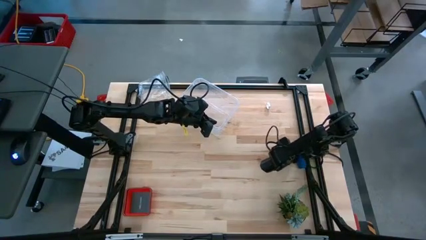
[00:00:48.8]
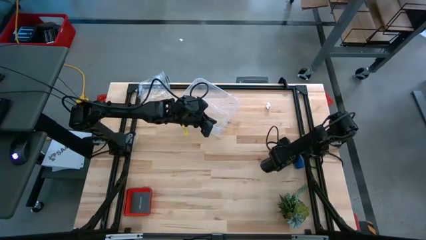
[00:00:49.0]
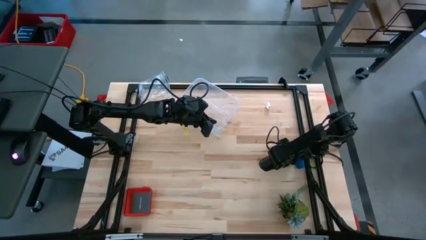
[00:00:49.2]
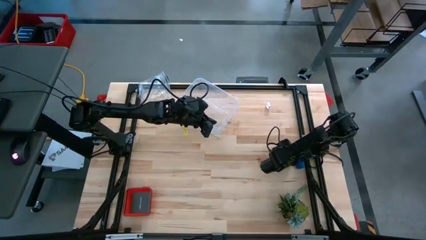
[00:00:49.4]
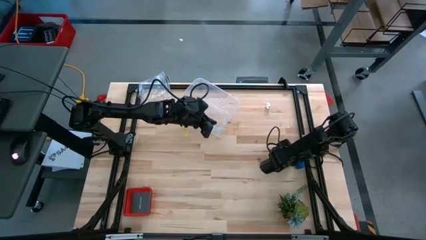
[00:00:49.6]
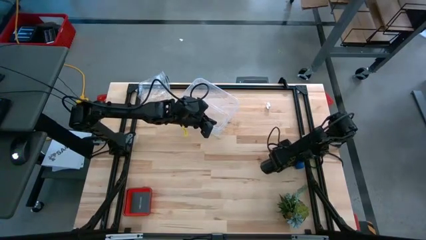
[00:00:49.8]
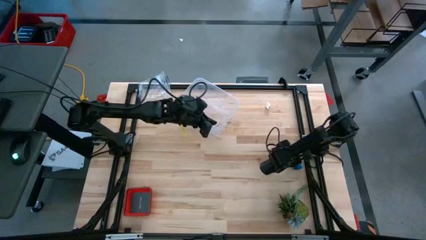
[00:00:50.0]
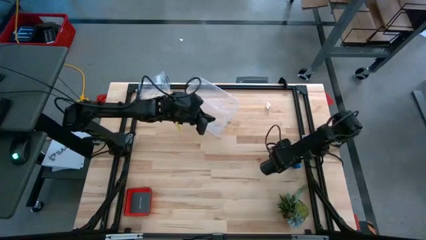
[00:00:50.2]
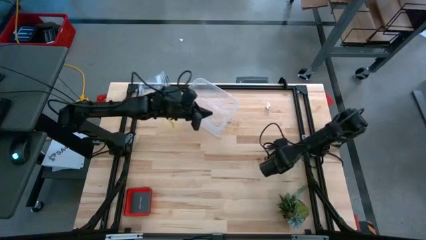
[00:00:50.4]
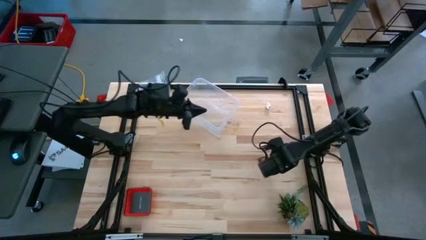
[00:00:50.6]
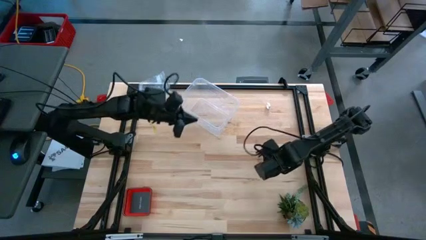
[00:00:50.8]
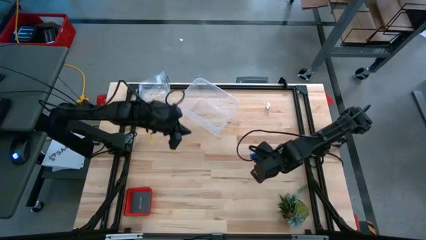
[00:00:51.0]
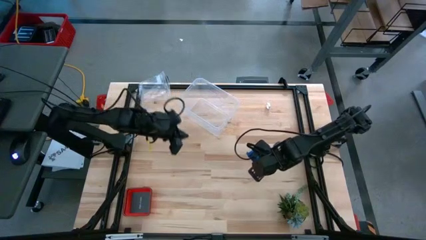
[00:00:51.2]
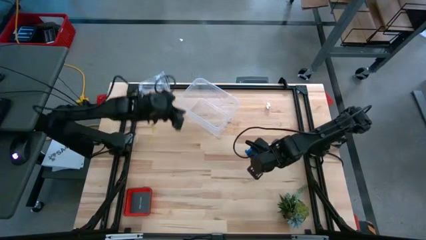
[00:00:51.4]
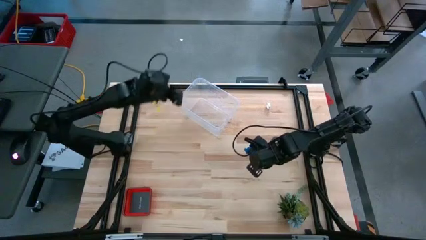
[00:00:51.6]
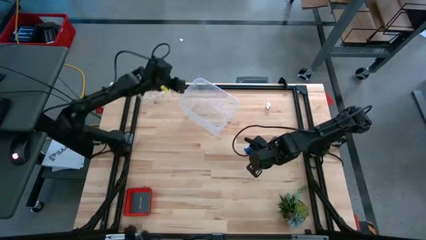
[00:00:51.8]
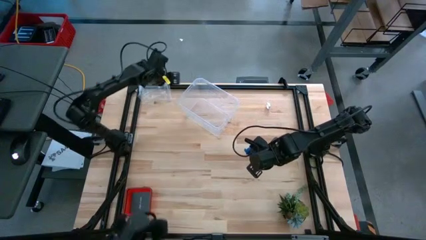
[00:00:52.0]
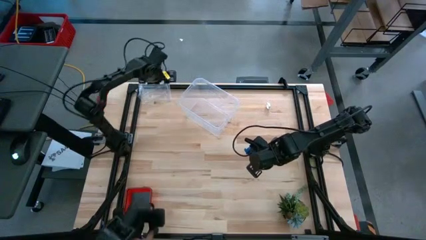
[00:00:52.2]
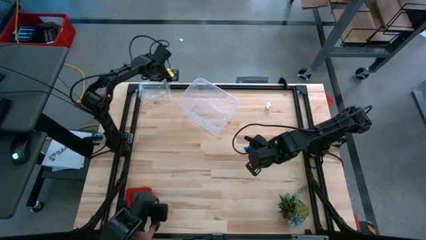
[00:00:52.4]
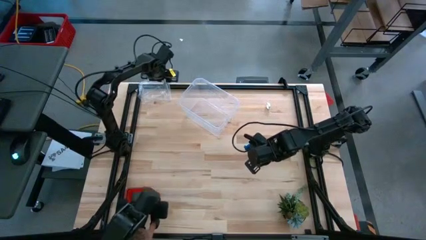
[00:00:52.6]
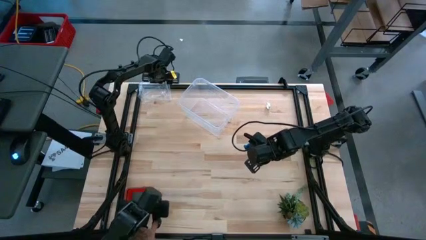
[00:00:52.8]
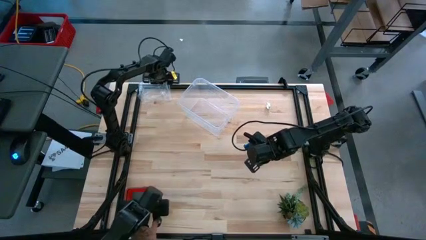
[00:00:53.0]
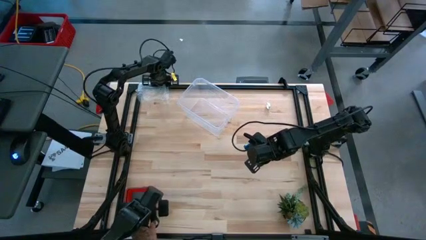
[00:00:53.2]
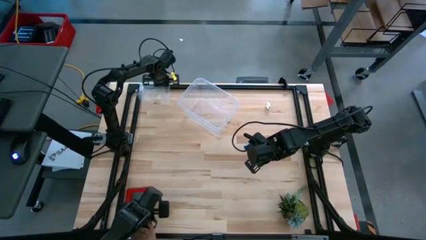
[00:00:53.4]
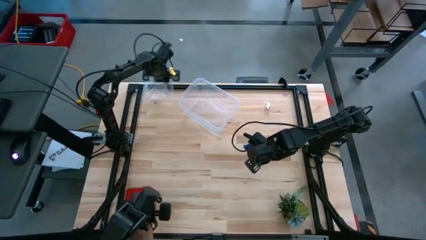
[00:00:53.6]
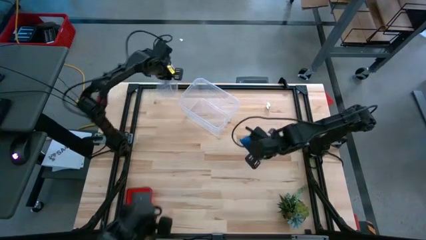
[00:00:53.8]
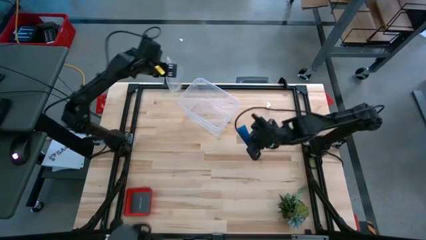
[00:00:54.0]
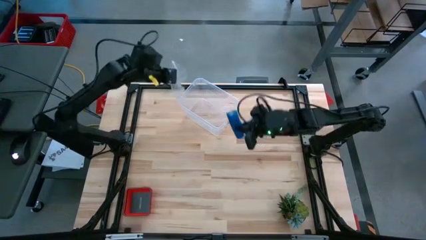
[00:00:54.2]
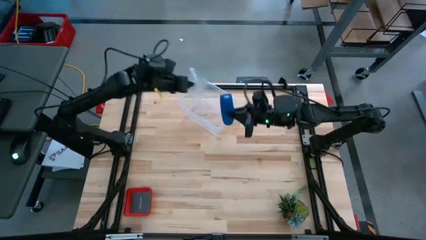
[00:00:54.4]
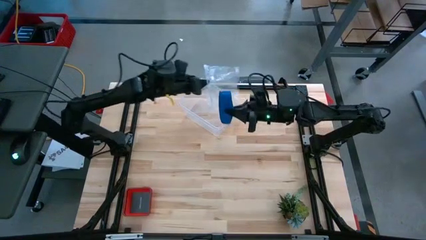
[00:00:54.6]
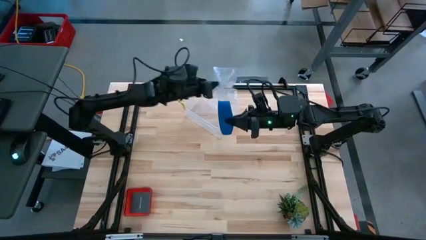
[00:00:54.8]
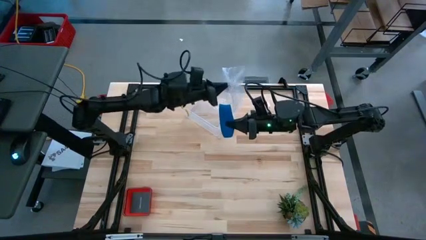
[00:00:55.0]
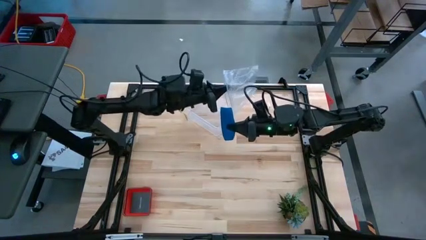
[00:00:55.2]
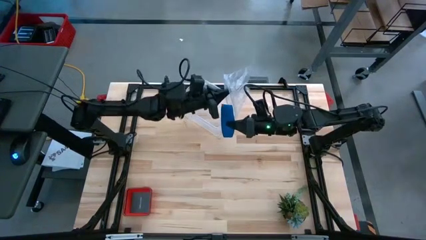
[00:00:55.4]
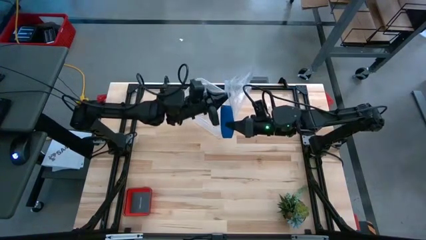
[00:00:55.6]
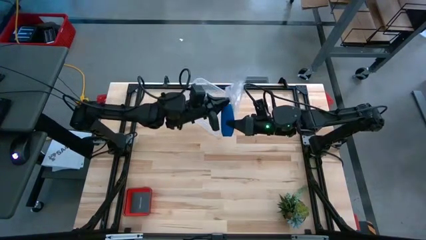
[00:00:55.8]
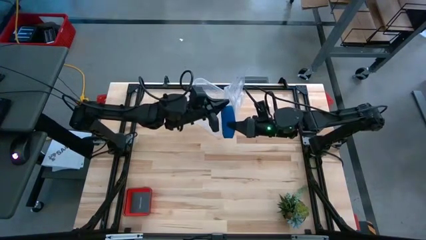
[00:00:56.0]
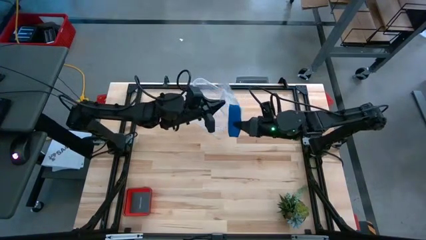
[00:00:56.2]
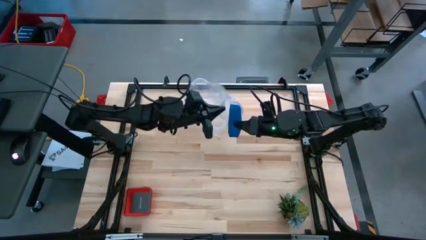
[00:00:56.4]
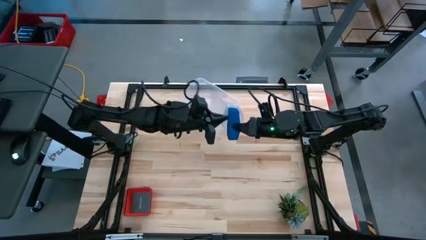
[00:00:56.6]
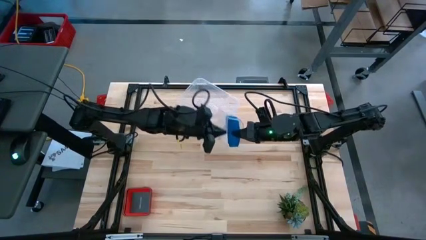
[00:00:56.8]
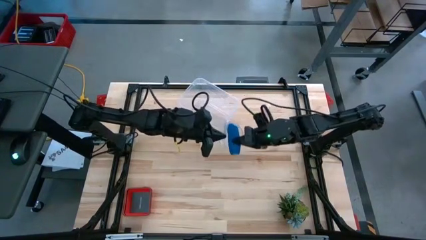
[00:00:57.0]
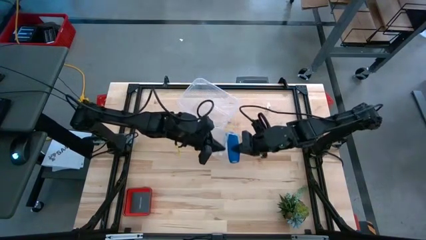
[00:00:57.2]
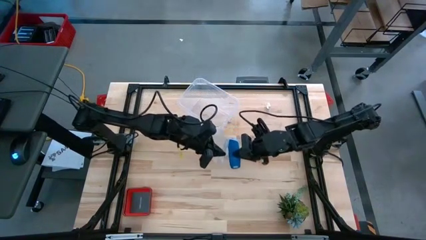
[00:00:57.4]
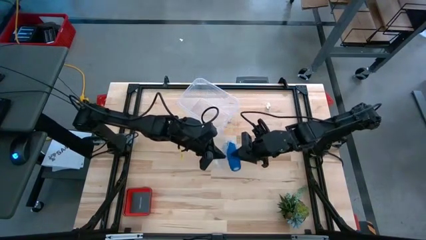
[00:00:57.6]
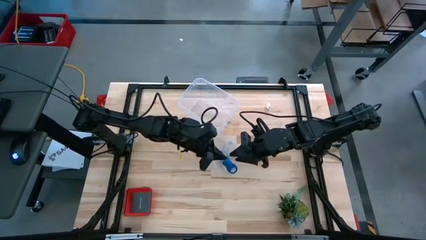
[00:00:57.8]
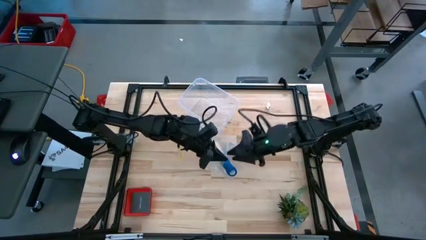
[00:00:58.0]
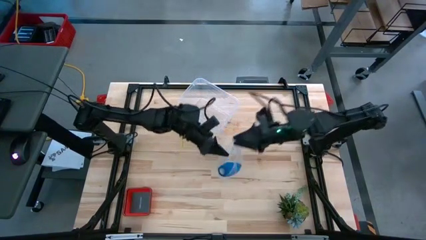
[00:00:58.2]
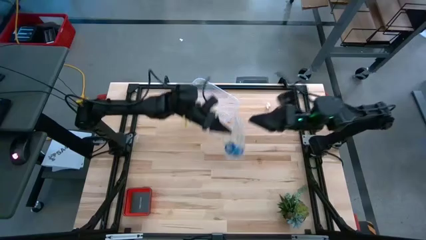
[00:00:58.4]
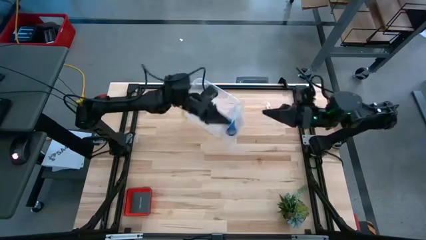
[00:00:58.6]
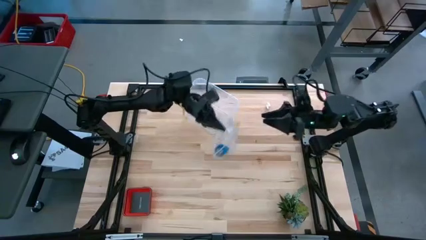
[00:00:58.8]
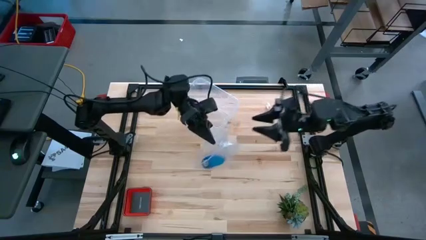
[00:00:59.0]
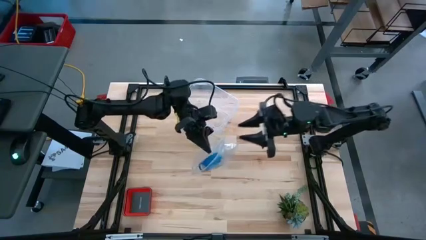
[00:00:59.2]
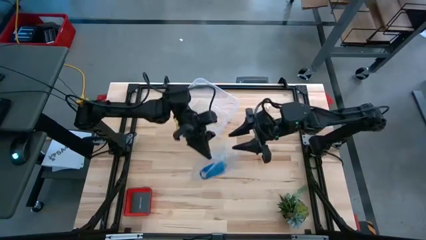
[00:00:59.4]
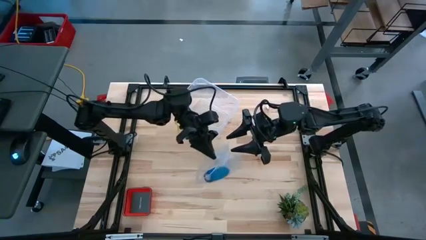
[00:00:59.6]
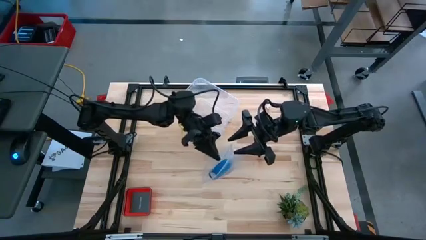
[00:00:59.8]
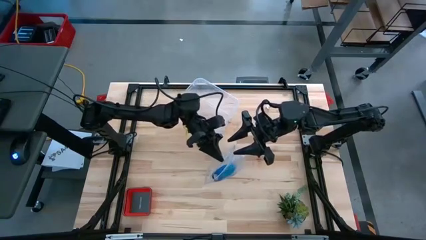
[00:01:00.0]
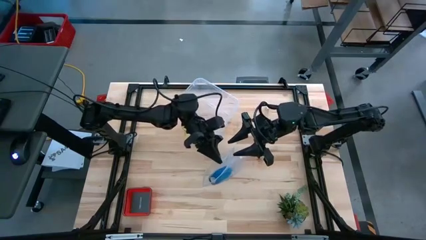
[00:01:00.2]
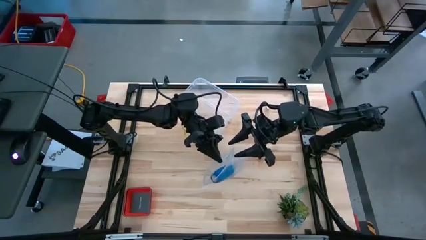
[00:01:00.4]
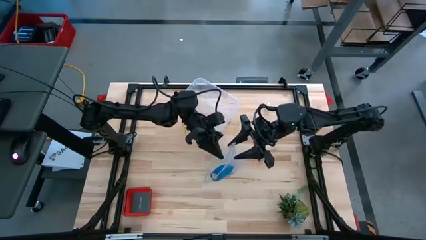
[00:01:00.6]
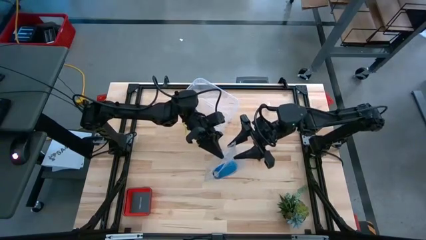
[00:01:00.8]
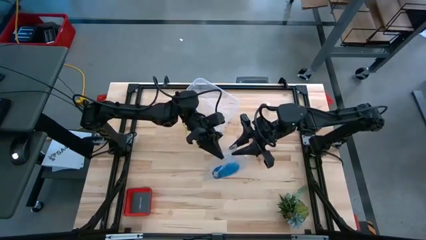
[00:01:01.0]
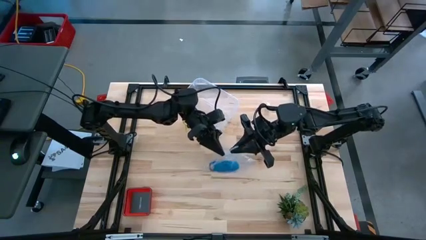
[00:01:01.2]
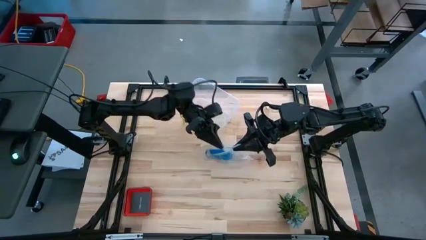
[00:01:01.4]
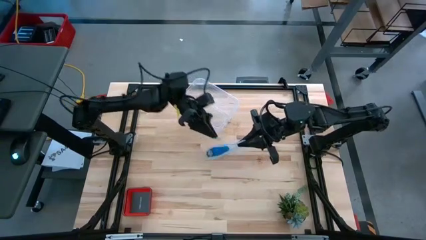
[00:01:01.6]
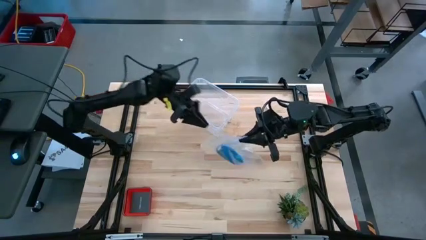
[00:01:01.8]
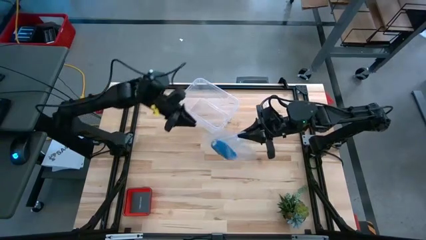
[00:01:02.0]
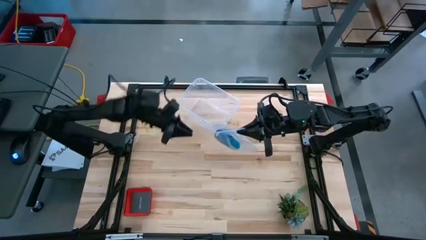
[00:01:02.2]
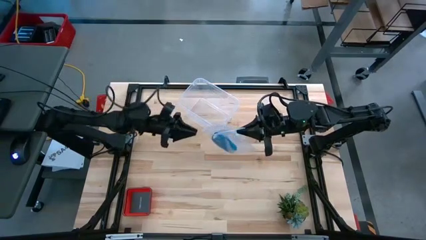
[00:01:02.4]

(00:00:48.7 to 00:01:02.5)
Task: Roll bandage
Put the blue bandage into the transparent zip bag

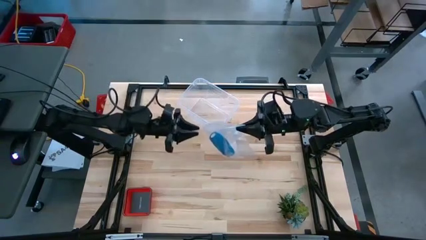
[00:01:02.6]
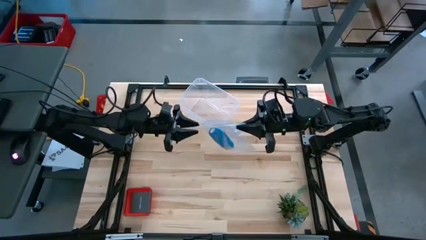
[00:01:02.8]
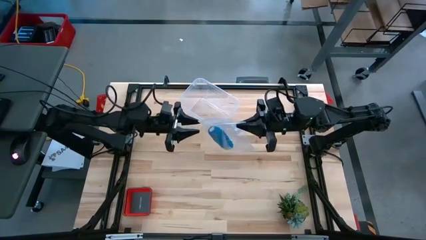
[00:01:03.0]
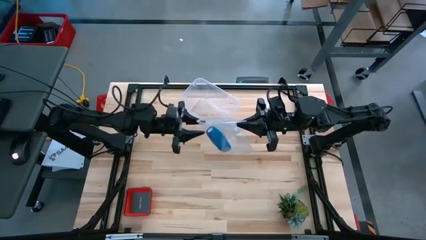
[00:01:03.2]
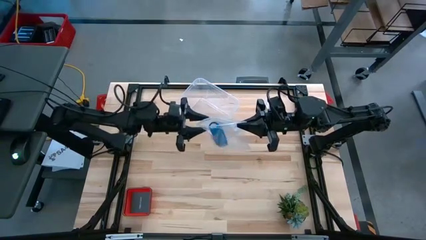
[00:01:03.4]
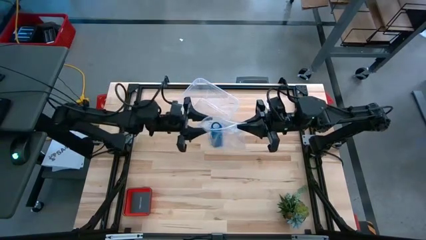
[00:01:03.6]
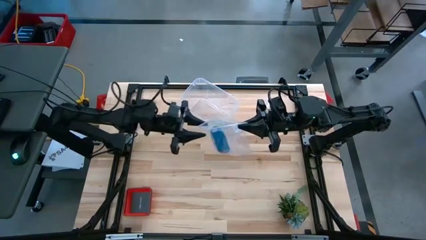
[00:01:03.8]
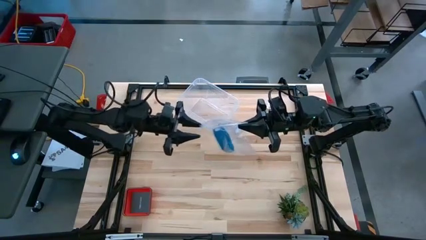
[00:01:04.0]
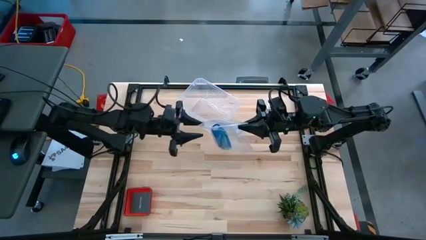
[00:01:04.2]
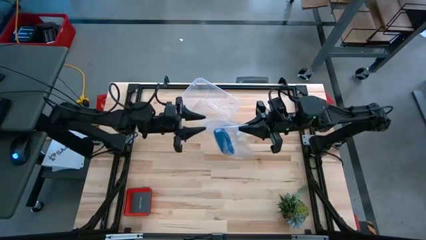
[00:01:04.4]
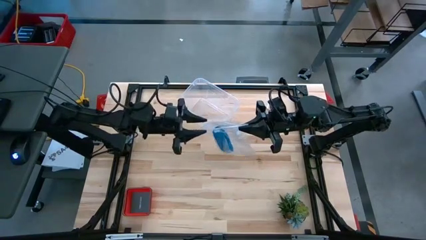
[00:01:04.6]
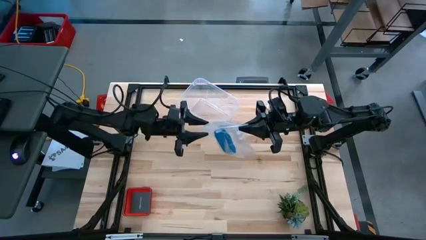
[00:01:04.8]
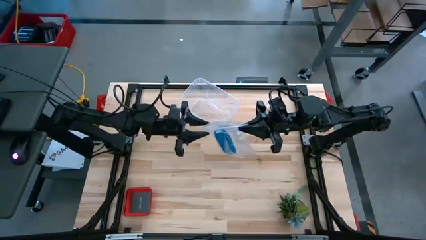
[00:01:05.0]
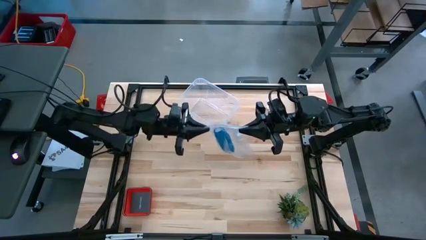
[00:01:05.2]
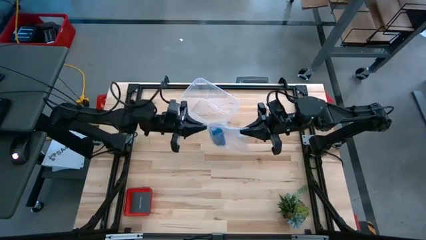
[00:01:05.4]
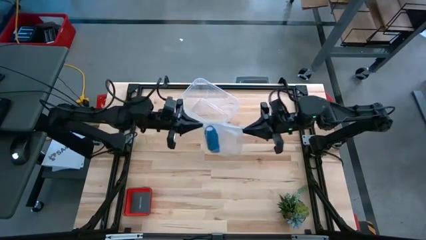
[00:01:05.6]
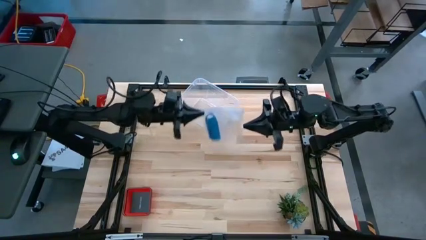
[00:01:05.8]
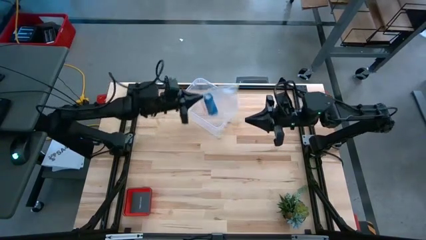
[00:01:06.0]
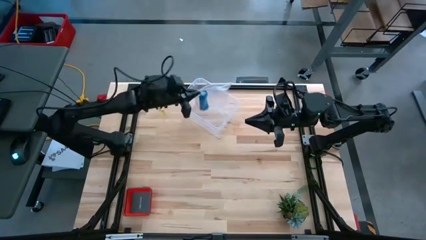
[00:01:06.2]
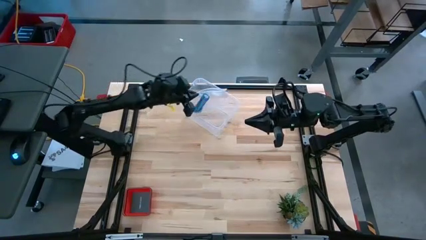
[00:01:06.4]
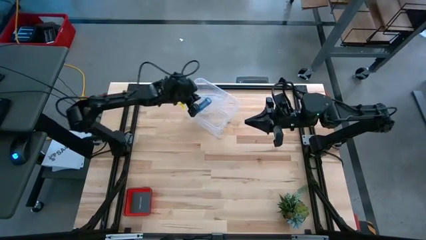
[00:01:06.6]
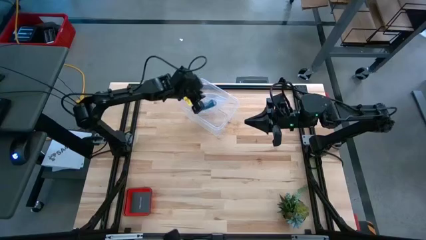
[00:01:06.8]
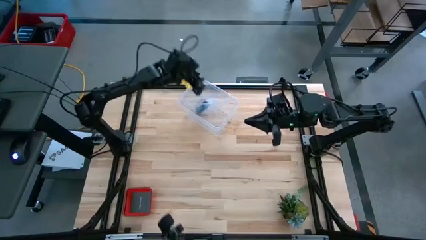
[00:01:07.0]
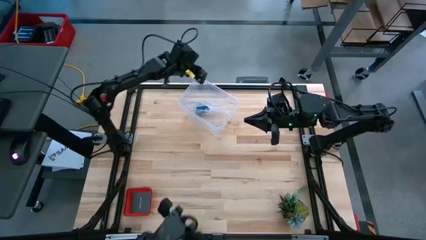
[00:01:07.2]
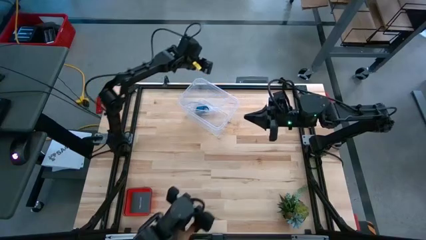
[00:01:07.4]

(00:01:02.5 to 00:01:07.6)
Put the transparent zip bag into the transparent container
